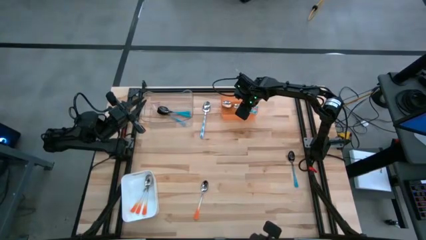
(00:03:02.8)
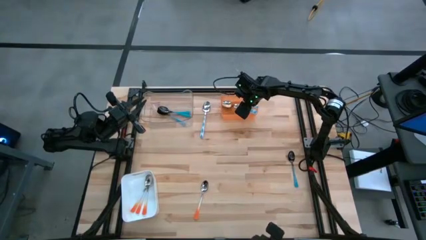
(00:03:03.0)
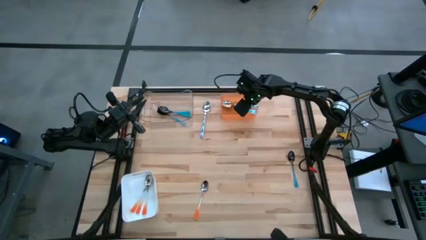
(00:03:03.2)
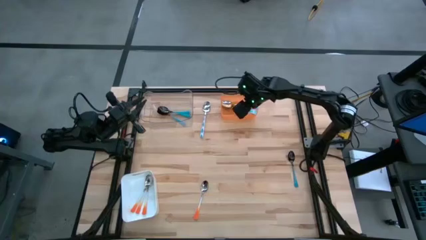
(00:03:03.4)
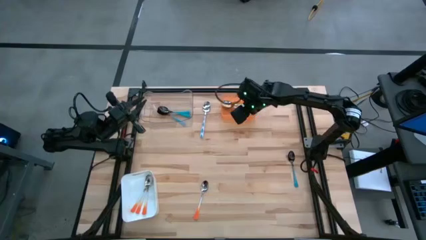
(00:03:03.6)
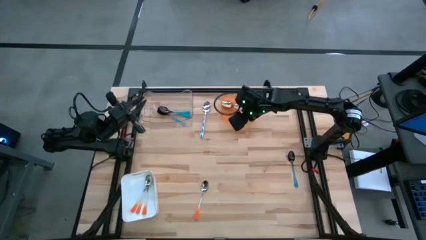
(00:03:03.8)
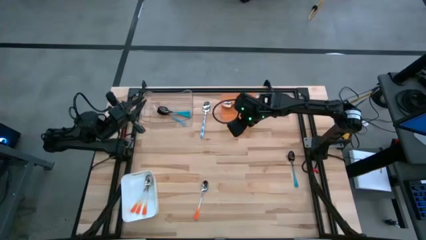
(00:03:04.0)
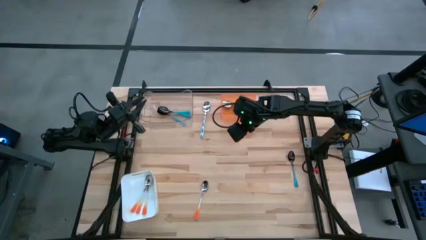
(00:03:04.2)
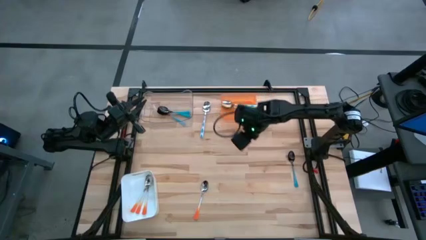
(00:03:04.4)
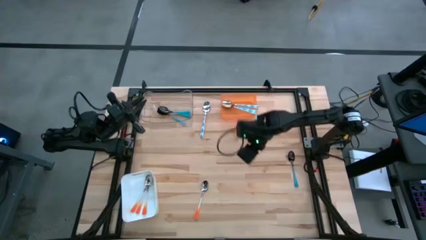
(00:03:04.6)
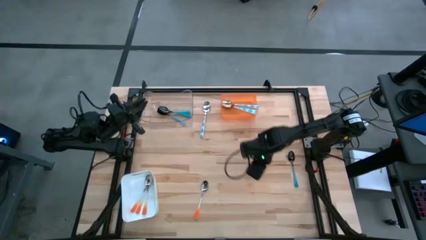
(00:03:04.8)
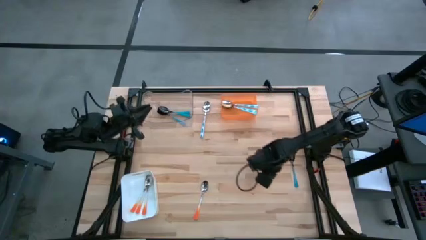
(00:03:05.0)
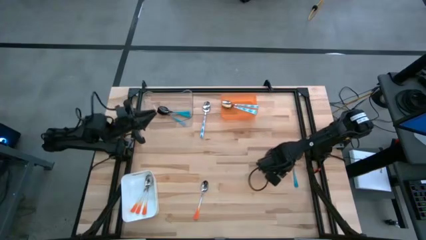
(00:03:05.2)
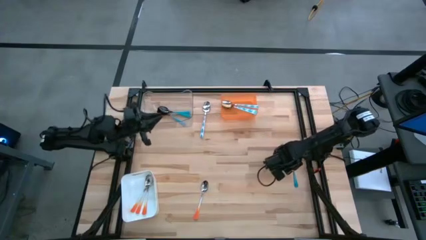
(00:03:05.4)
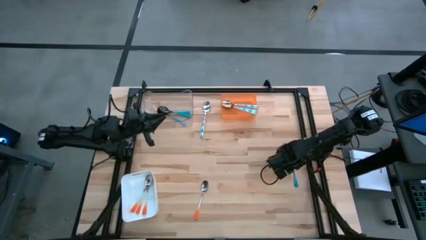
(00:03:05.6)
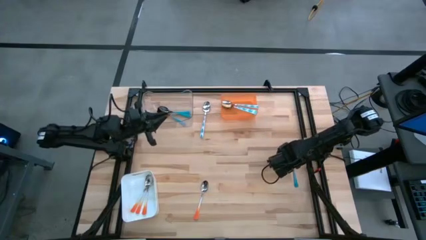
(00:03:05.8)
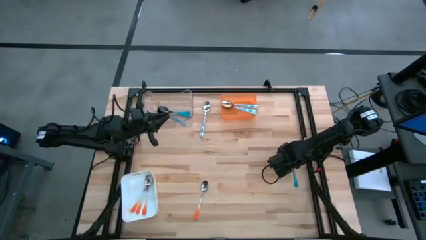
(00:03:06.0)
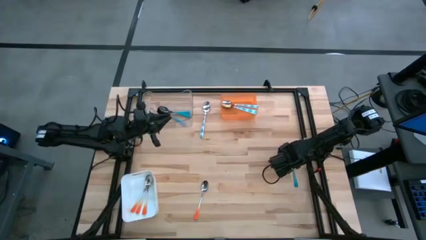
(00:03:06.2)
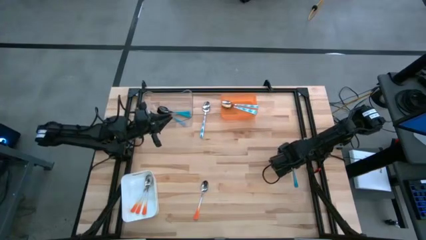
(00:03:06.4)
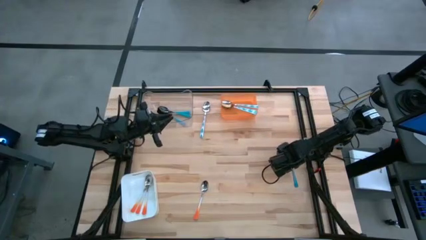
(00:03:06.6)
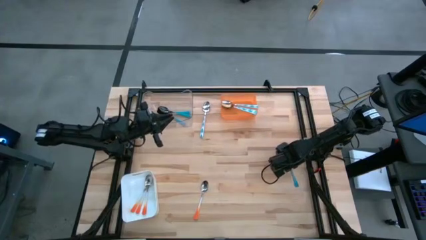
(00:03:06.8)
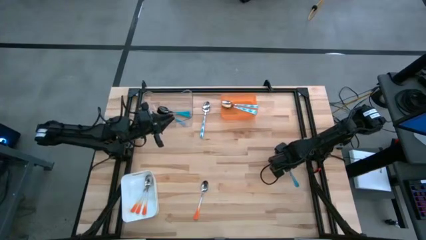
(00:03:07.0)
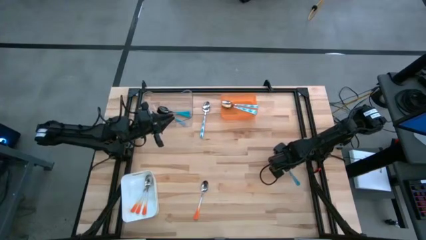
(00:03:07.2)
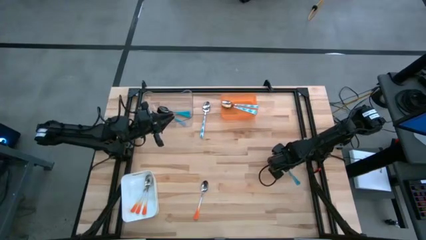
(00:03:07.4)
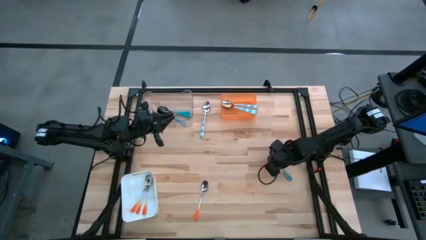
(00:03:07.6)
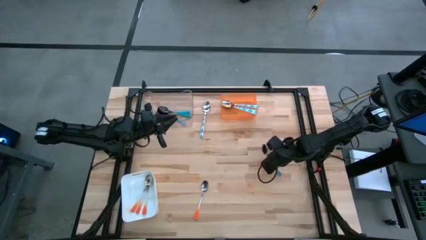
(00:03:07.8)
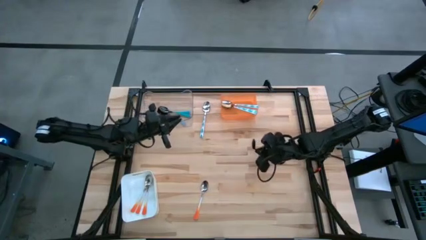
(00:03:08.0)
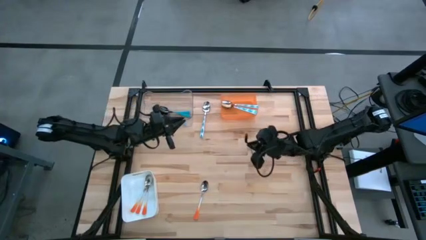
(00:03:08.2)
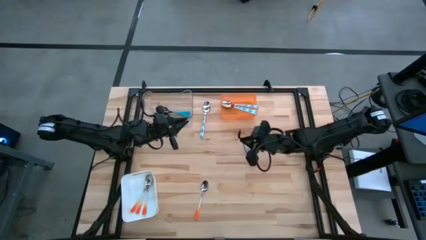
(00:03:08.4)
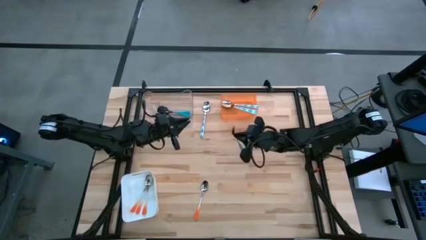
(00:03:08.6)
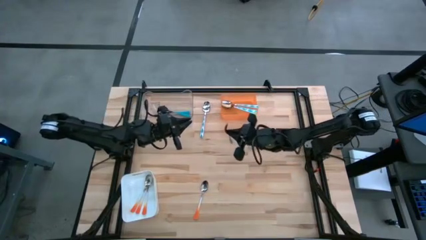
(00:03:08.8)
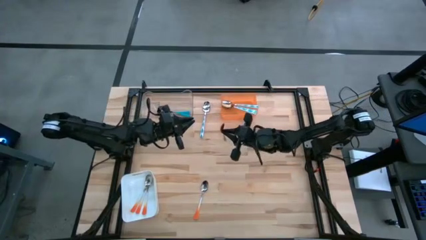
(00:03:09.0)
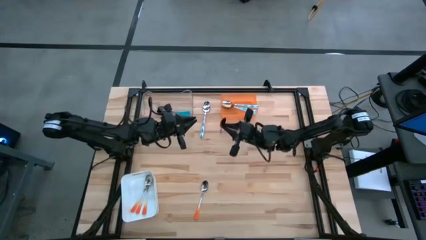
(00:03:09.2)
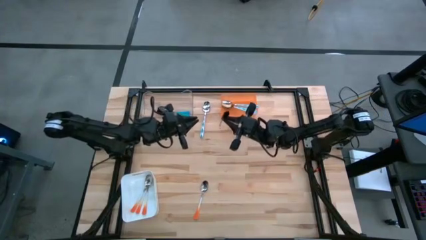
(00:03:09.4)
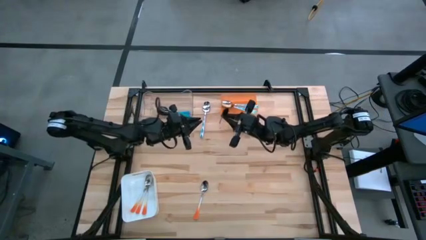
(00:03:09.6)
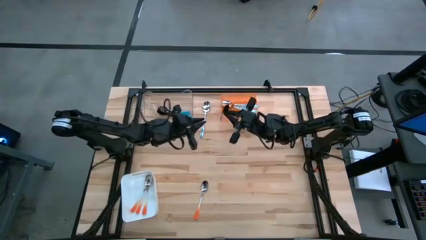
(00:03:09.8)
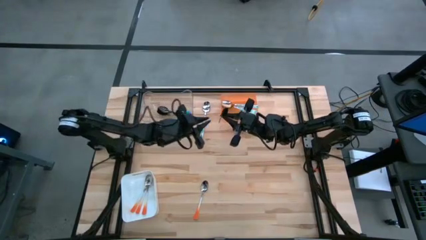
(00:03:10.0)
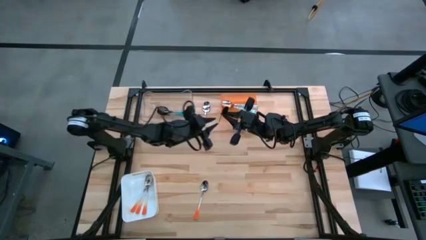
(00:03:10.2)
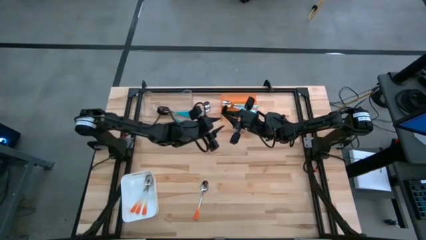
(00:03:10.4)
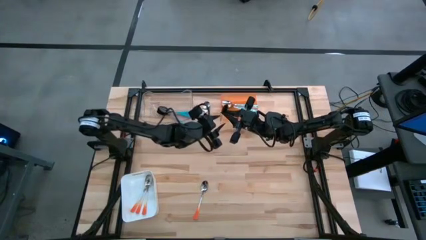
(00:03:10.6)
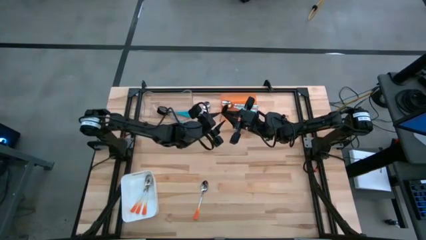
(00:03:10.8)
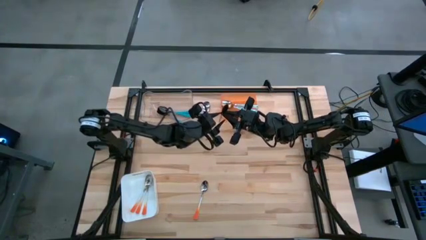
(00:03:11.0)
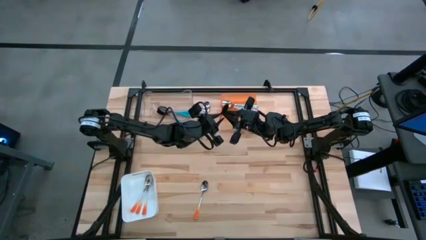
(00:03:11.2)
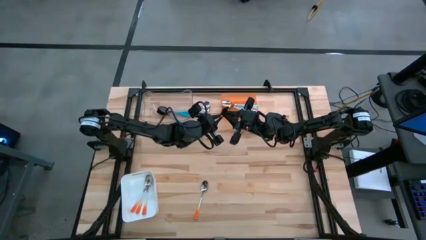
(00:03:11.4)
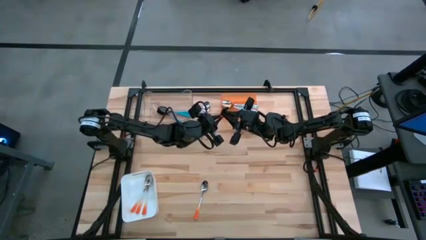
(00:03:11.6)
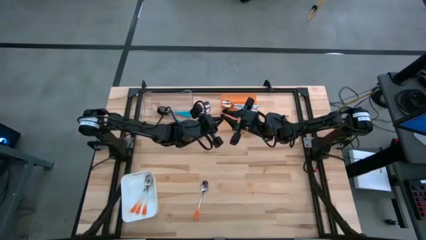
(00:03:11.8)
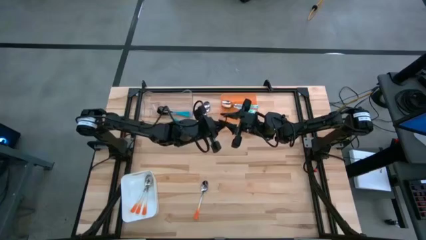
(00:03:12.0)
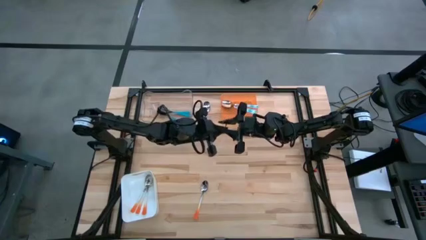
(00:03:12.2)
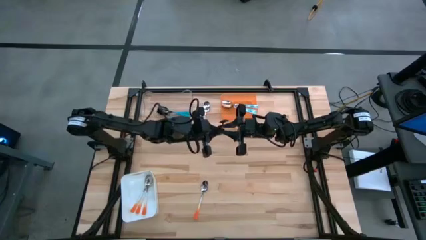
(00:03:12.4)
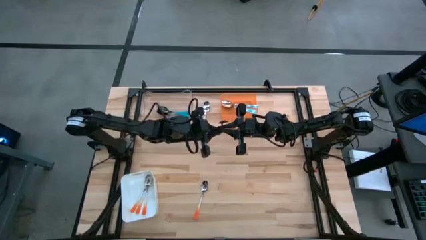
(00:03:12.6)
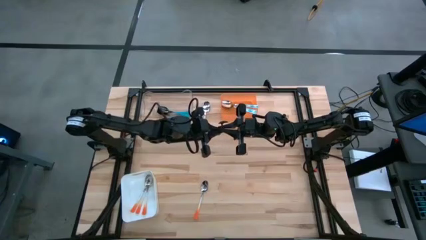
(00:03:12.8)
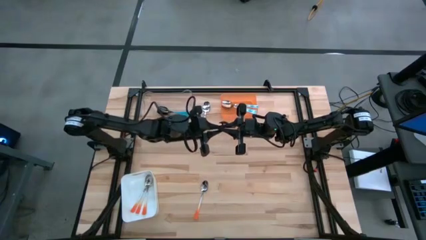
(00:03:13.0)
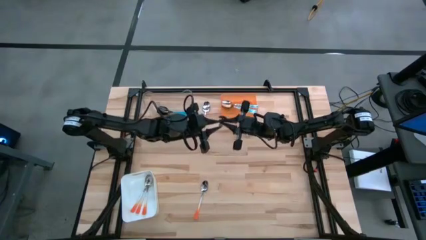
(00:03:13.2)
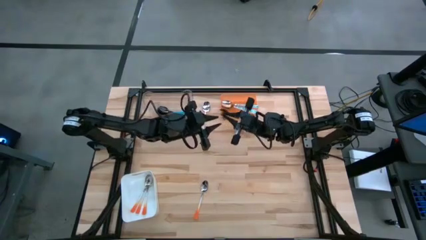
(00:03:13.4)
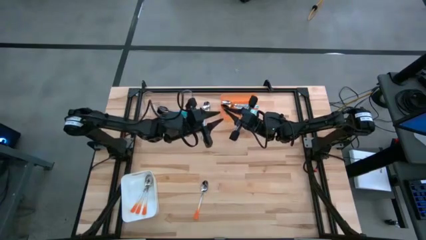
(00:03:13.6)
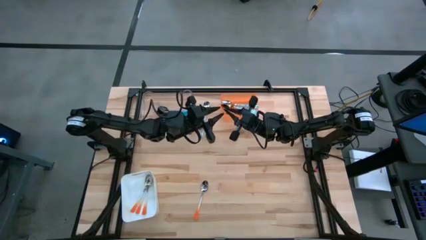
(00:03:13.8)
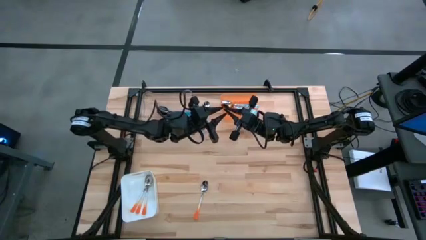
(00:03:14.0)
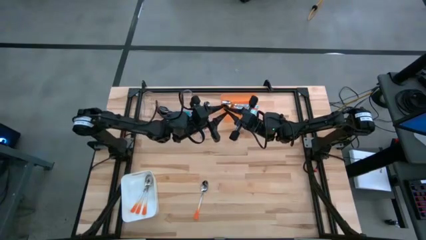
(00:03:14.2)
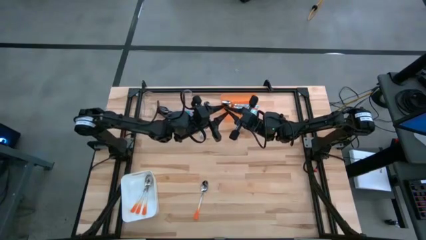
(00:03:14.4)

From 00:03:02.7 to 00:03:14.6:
Task: Sort silverware by color (type)
Put the blue spoon into the transparent bin

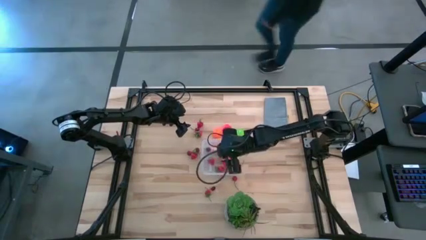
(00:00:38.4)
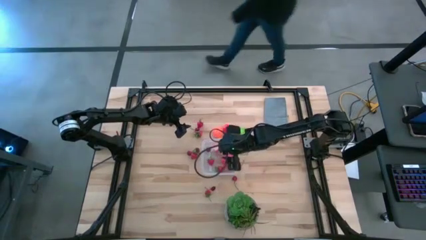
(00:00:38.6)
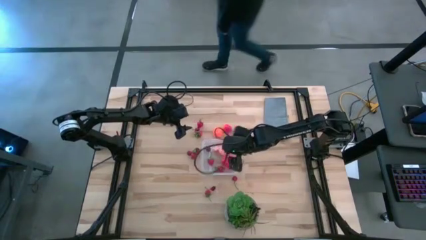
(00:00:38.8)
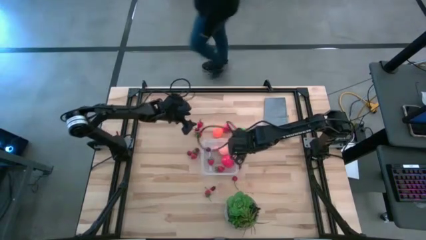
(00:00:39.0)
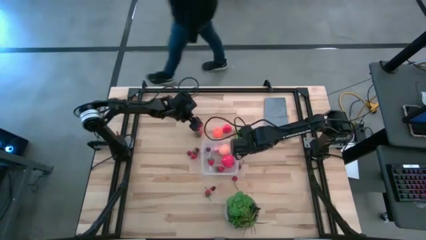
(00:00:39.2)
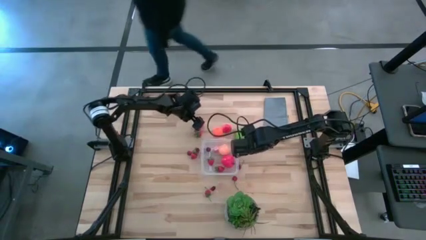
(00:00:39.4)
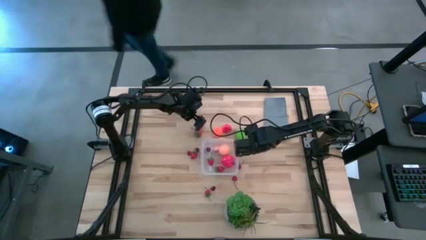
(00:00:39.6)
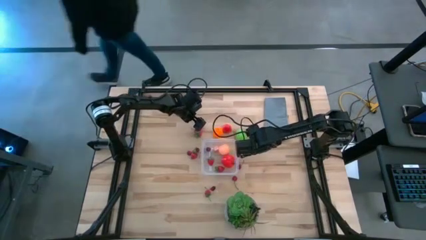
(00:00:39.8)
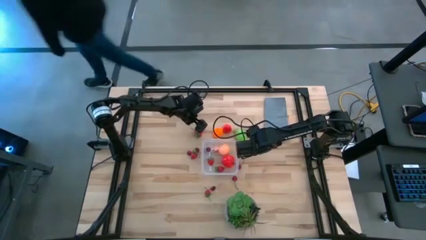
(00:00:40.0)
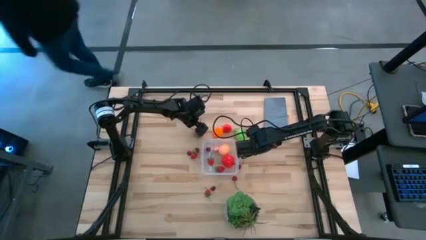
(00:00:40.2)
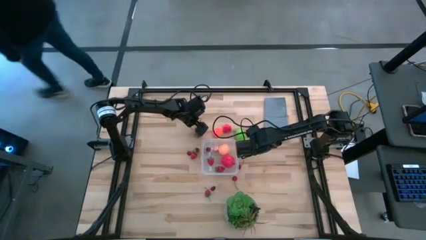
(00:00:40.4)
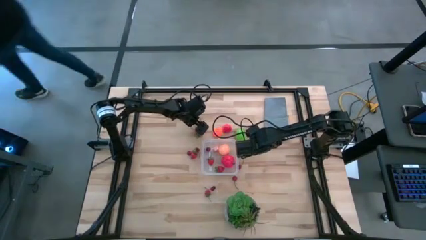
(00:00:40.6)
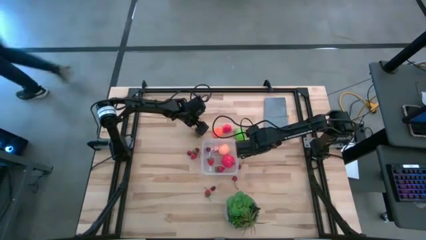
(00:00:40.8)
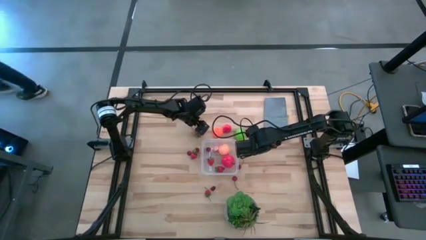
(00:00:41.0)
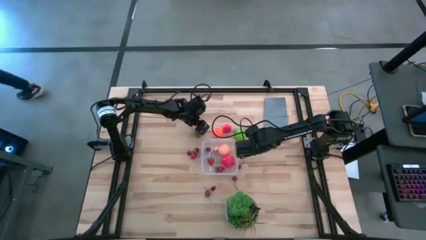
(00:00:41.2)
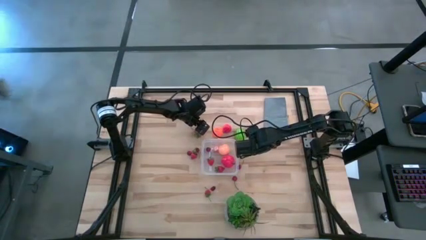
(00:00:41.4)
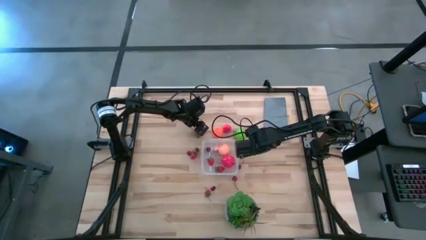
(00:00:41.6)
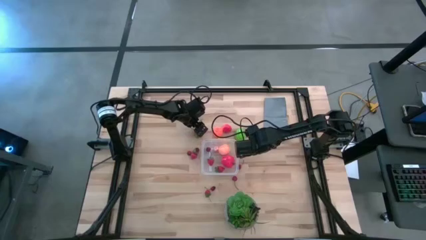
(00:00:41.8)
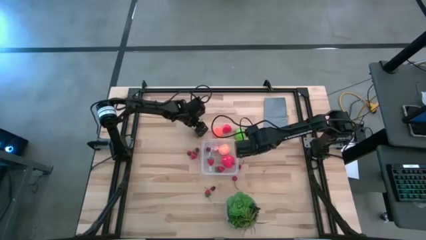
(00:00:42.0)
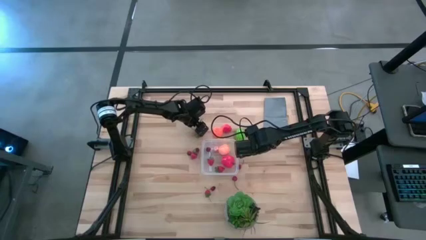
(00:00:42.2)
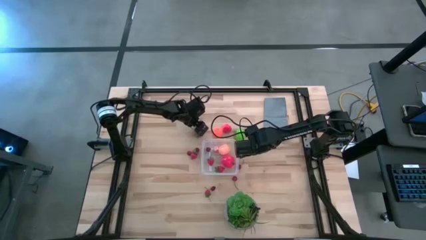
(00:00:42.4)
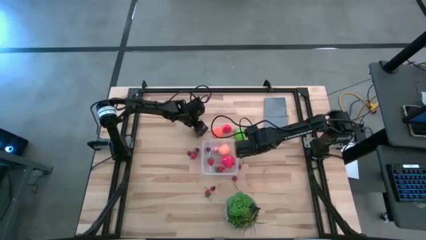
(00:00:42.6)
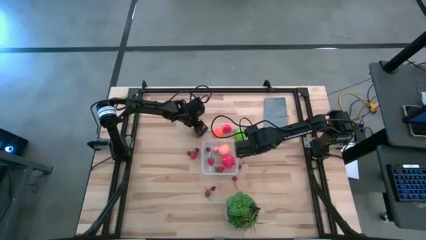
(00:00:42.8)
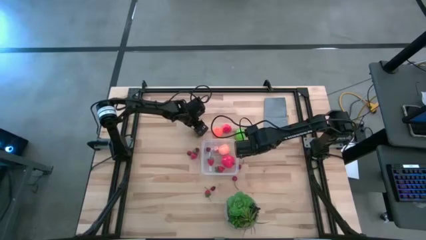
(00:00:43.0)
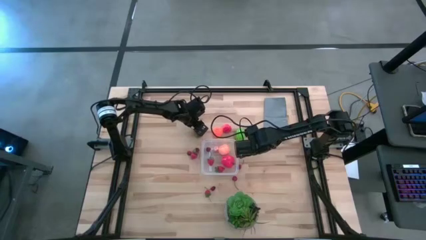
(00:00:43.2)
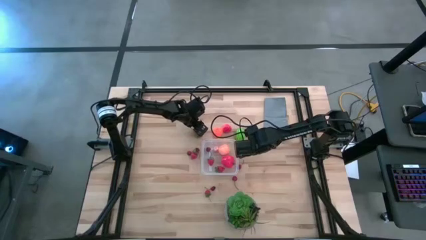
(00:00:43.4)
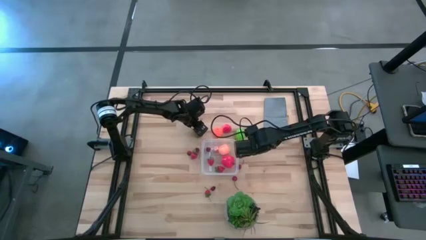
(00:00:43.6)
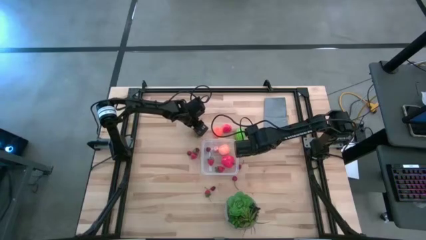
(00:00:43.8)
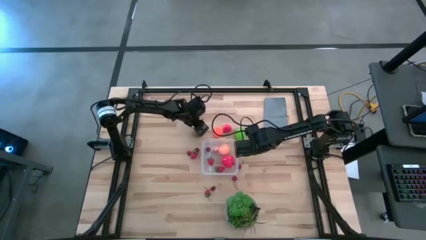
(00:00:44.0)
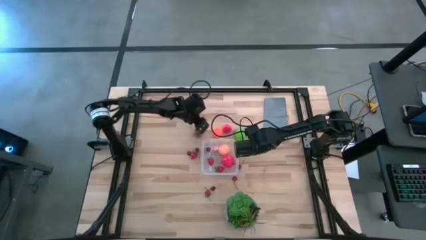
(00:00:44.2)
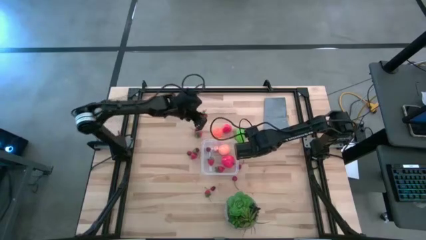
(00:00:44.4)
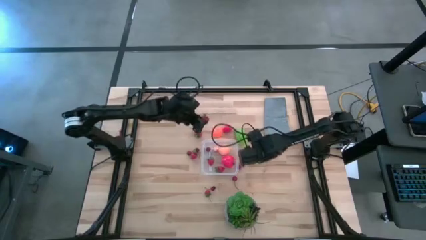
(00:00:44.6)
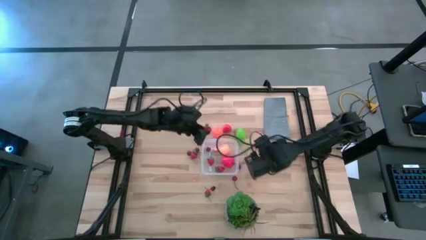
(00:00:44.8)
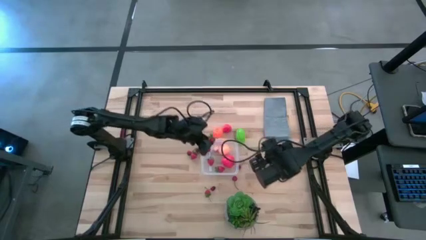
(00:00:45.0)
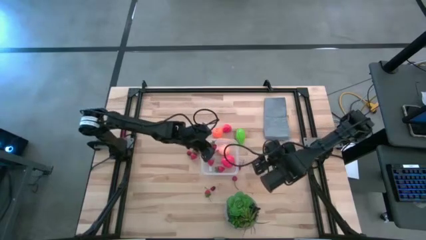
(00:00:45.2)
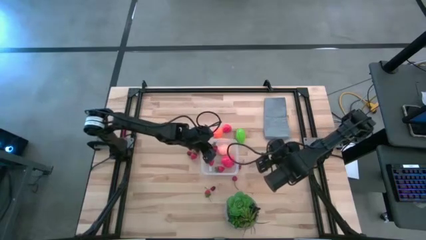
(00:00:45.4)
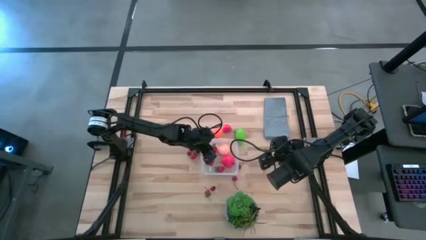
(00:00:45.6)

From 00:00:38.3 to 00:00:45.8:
Task: Pick and placing Produce into tupperware
Put the red strawberry into the transparent container
